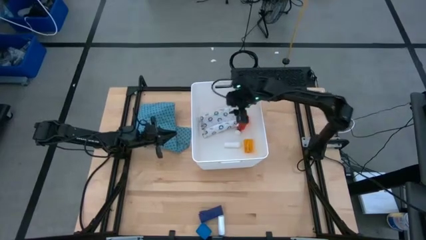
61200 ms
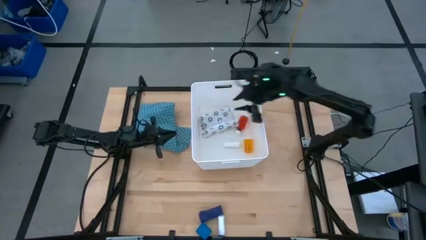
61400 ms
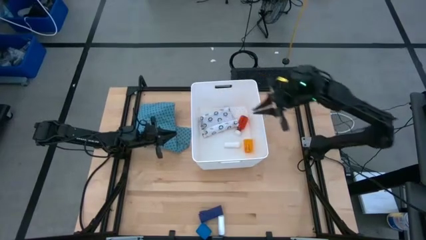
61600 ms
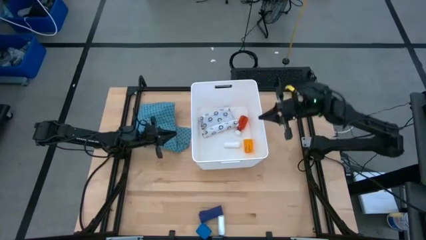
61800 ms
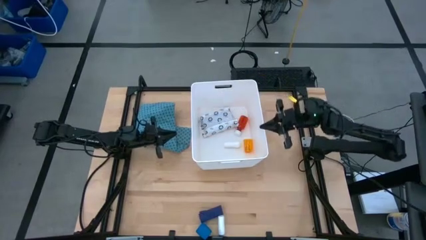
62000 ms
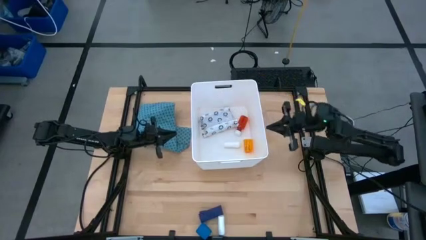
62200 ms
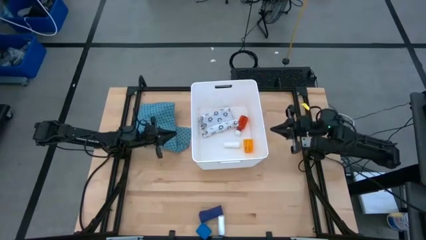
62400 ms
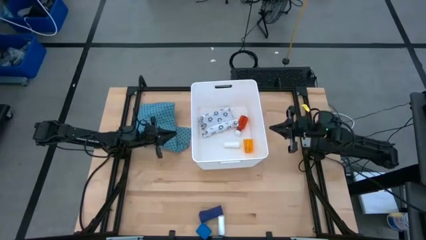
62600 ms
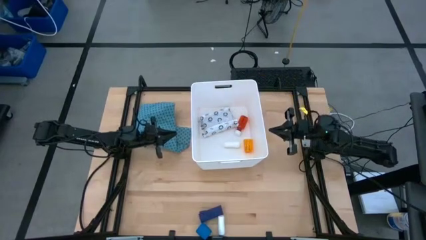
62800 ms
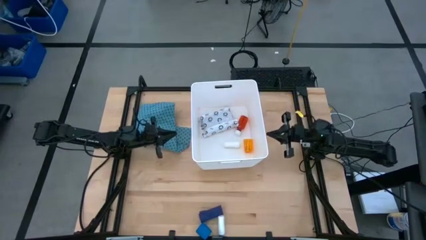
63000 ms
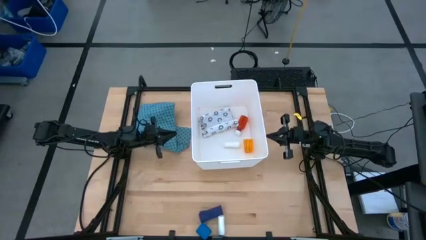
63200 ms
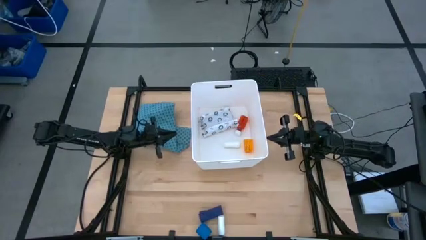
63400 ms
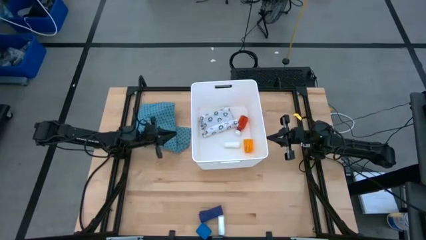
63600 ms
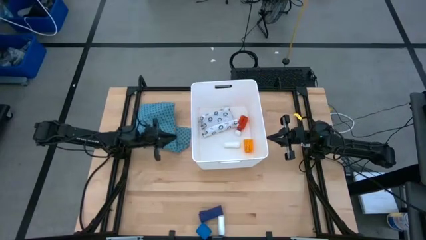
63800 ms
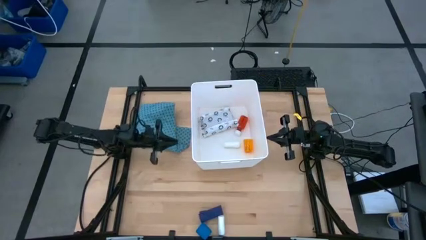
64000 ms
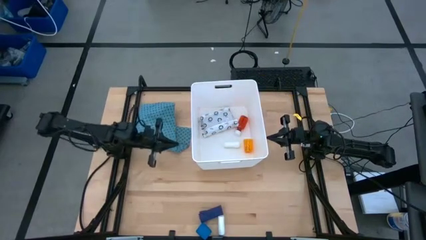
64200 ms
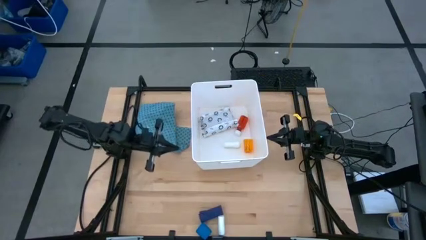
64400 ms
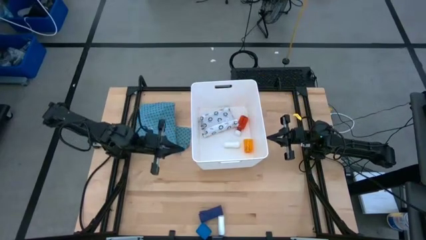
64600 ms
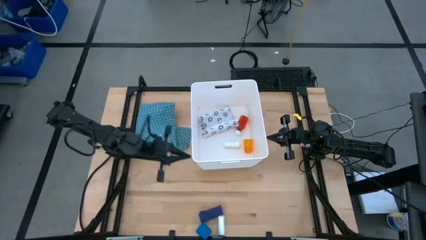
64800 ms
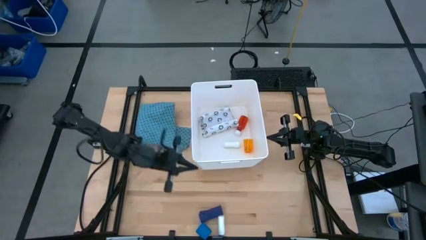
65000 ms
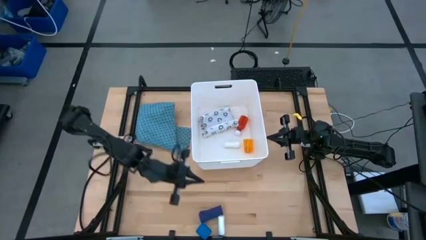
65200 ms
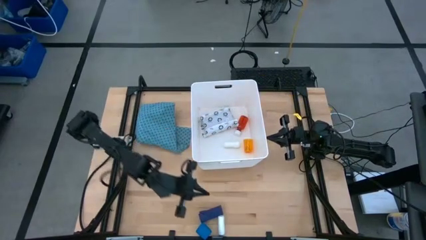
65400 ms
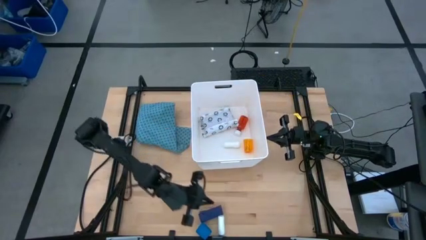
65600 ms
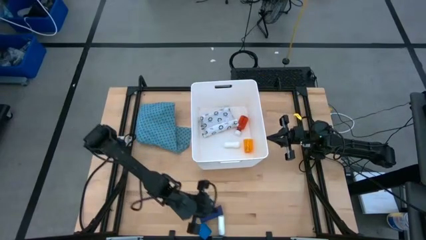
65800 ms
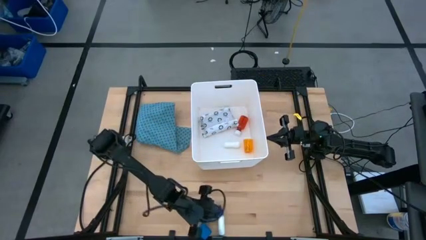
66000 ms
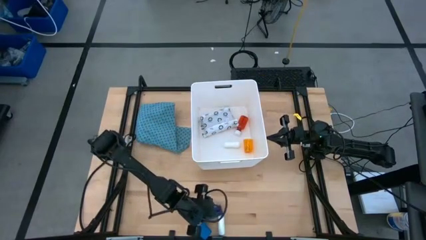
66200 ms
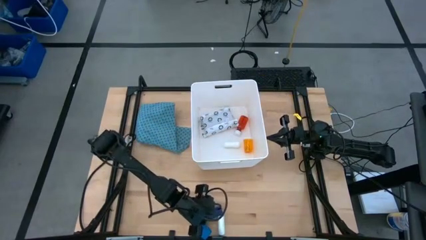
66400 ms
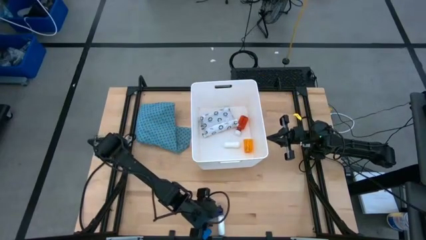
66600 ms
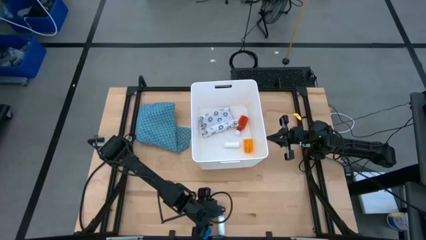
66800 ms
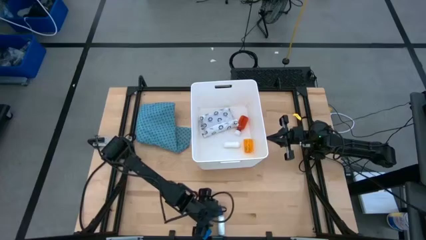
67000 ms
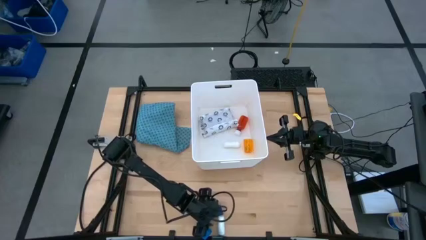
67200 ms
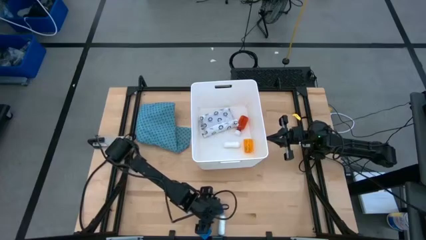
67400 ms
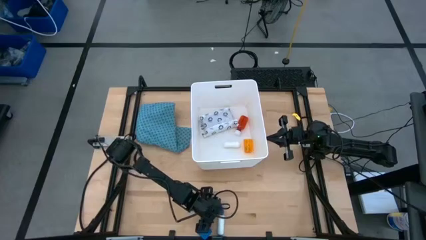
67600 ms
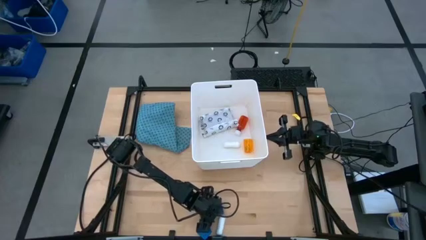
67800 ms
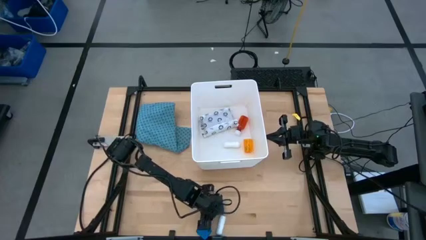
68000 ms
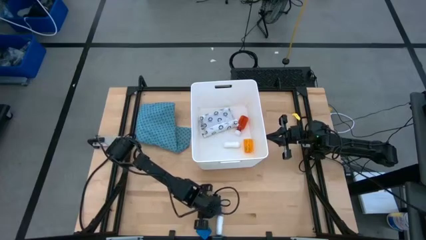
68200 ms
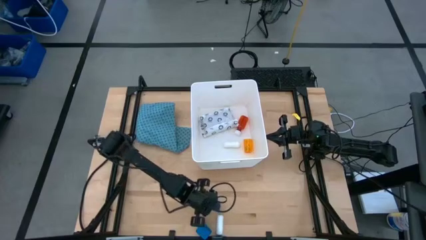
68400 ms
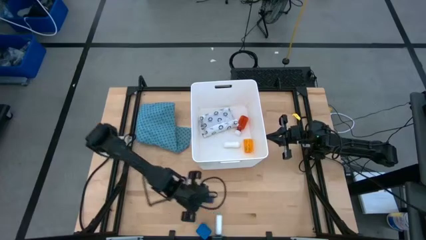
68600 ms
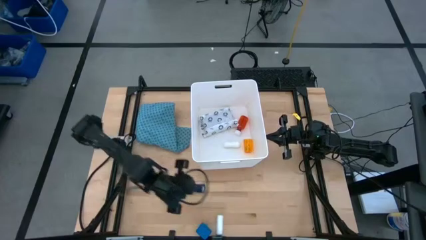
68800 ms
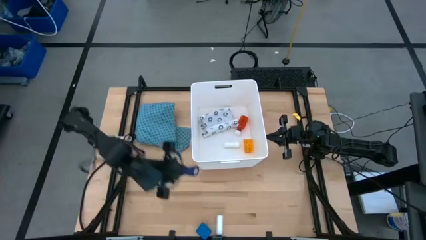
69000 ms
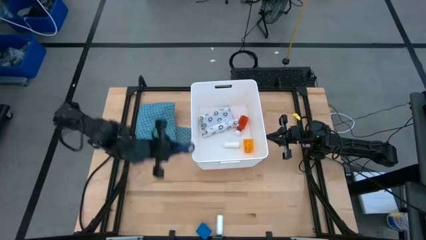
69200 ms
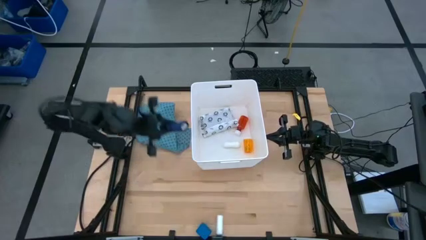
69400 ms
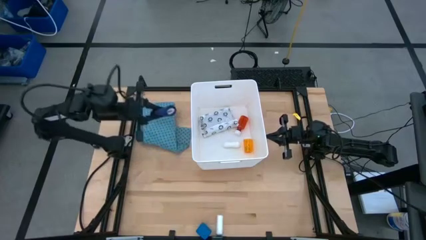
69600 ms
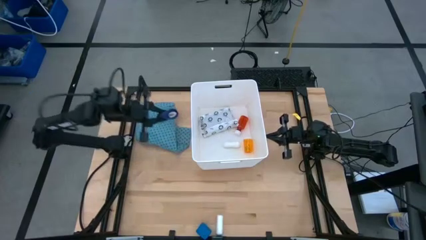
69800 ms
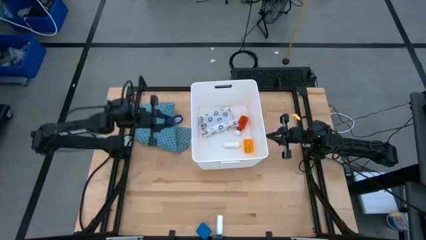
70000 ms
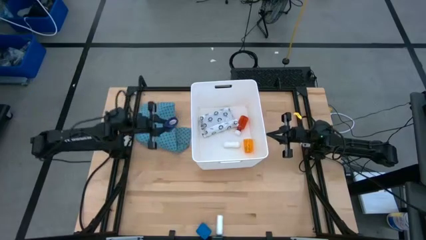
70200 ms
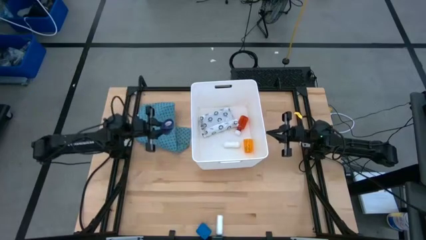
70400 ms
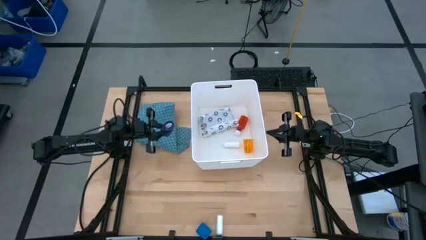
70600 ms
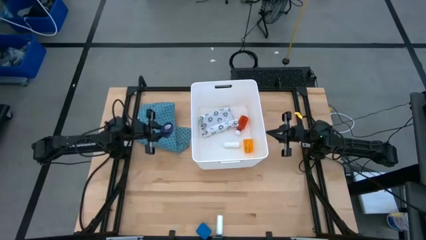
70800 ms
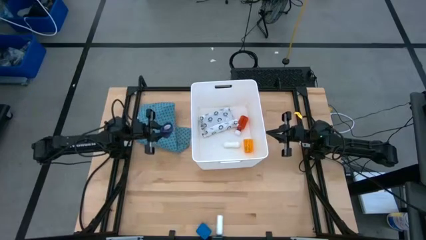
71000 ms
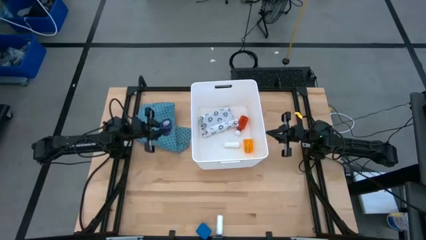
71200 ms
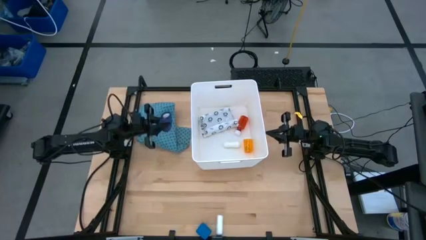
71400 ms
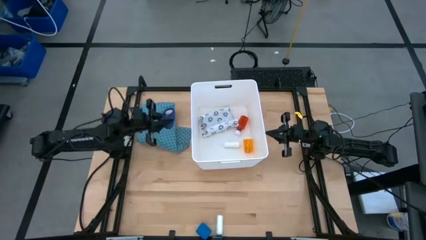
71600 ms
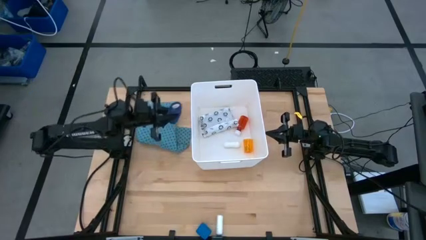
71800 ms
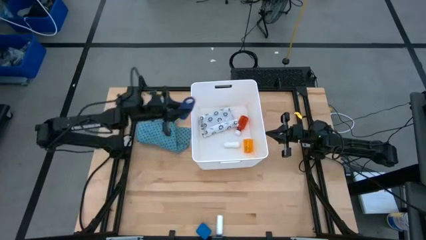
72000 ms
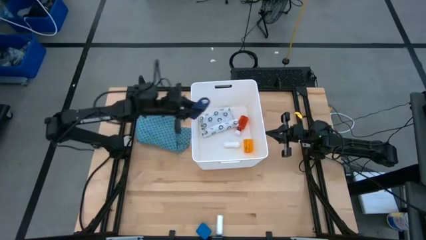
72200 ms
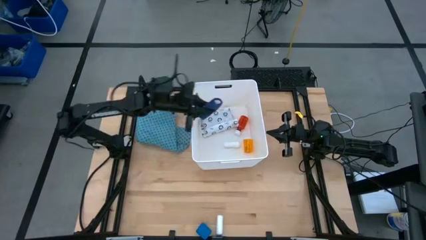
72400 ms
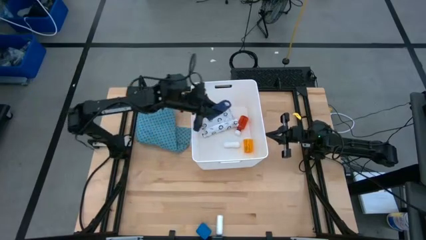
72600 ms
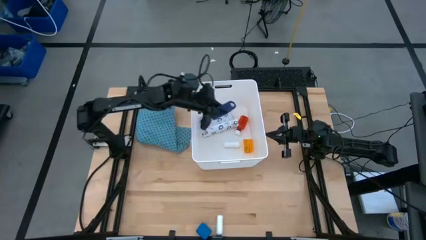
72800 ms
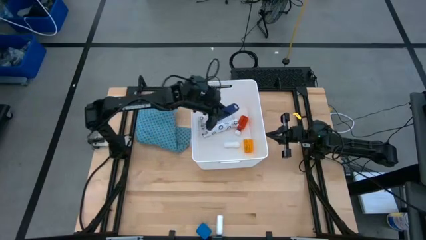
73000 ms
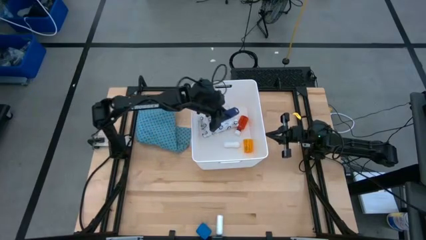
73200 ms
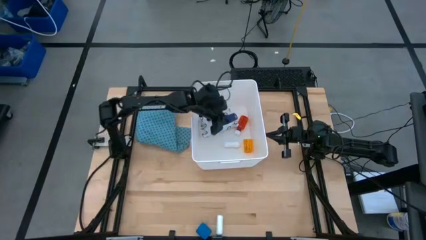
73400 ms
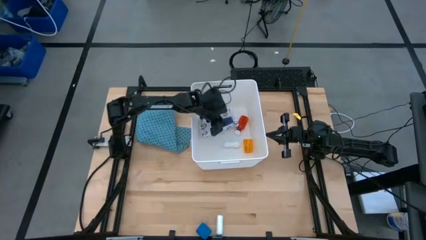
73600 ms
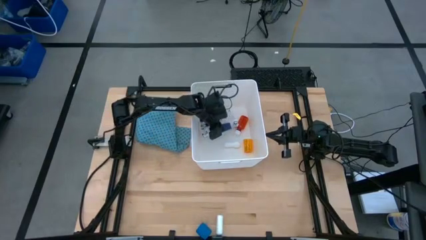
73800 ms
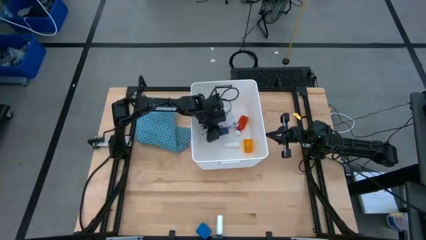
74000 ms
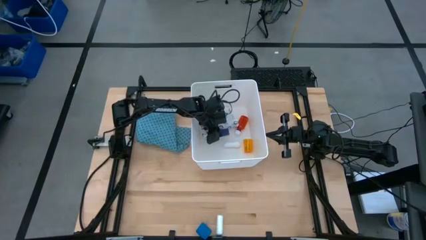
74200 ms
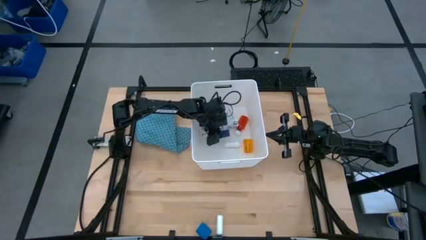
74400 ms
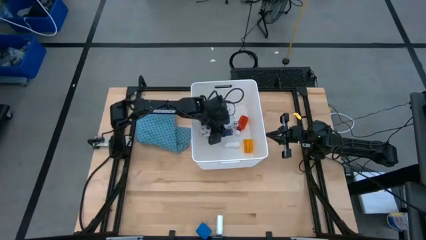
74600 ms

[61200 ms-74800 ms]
Task: Pick & place medical supplies in basket/bin
Put the large blue bandage into the white bin

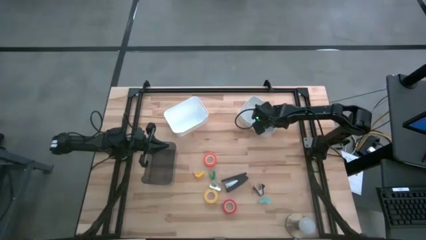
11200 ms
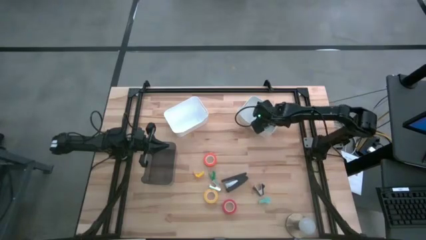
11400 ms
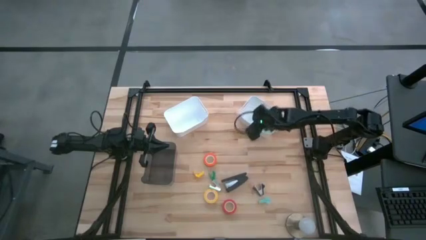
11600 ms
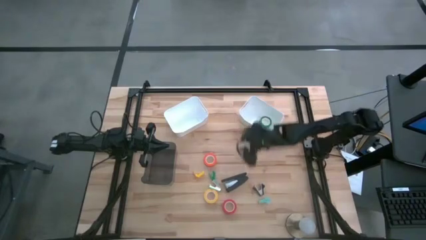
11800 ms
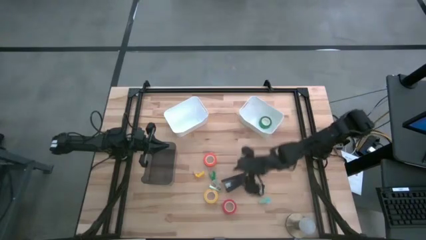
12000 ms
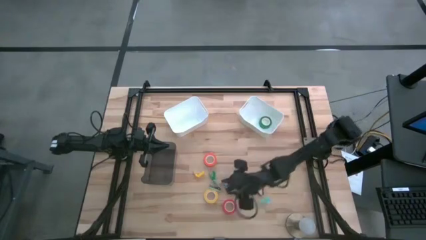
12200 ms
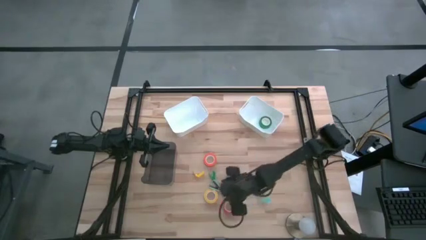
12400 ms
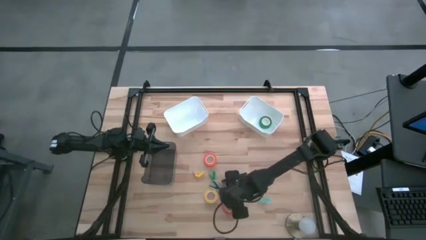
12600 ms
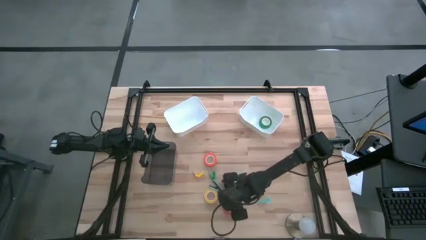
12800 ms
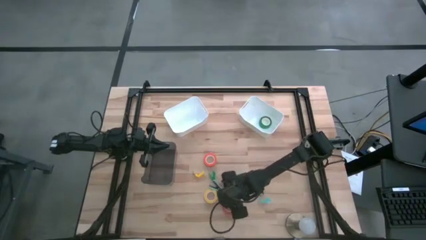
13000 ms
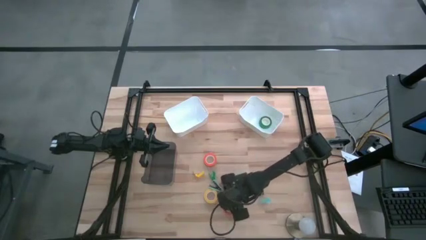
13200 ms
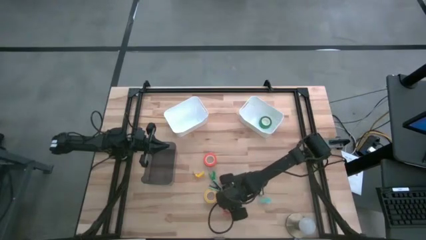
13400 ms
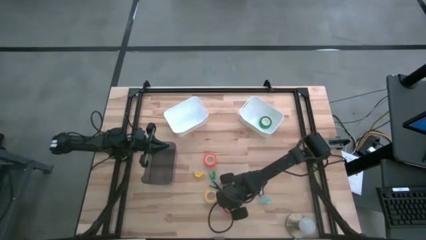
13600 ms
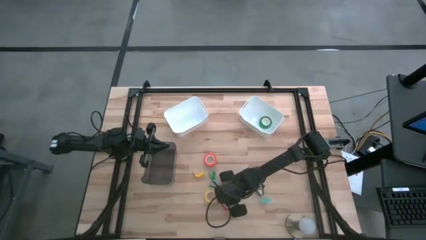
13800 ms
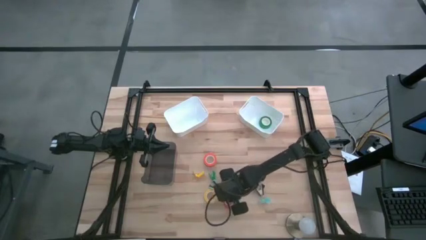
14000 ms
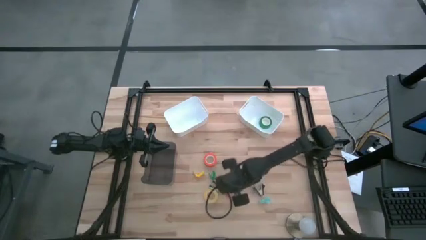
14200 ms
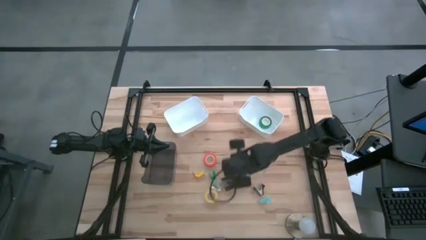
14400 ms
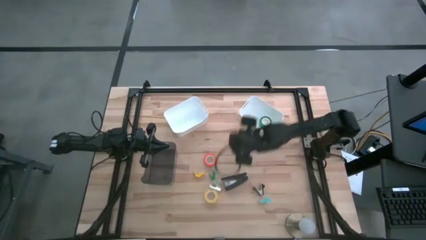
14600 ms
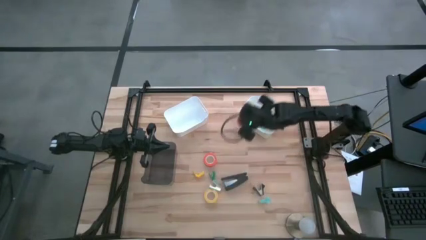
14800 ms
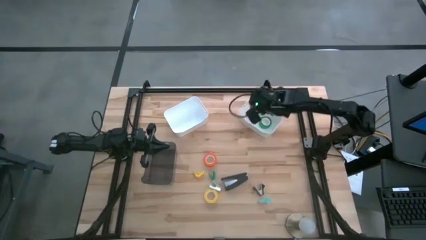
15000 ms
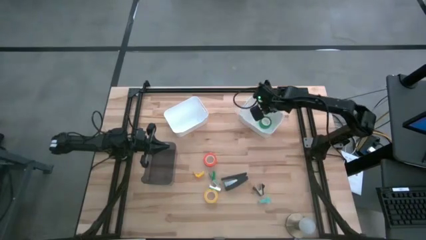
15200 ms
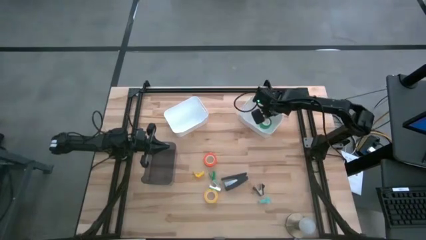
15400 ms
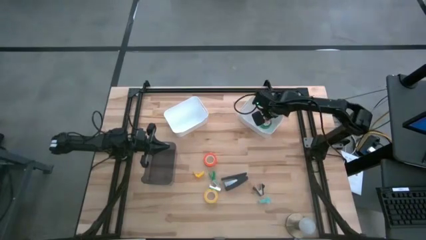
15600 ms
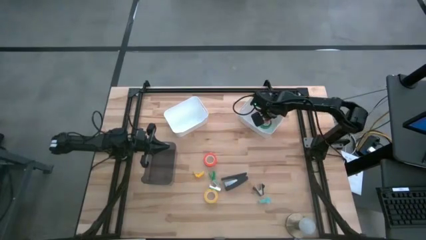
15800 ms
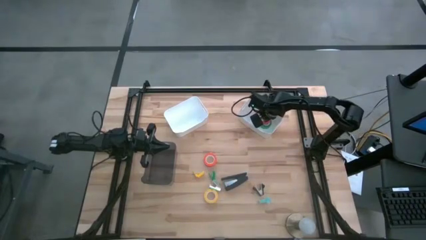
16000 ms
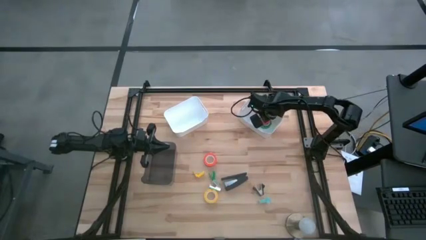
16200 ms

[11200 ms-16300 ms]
Task: Pick and place Stapler, Stapler remover, tape
Put the red tape into the right white bin
